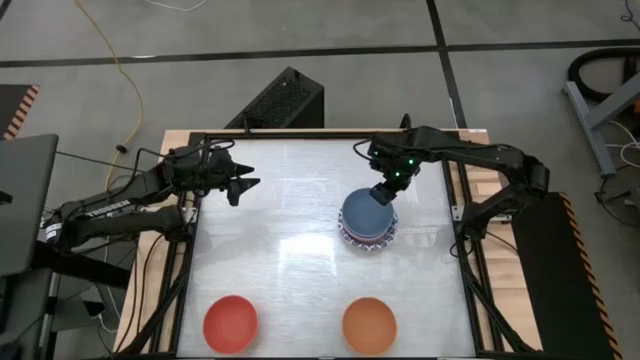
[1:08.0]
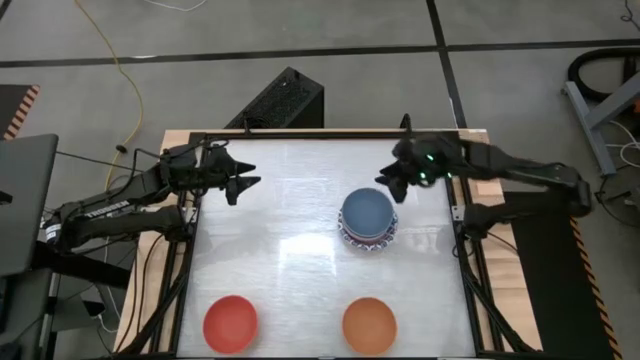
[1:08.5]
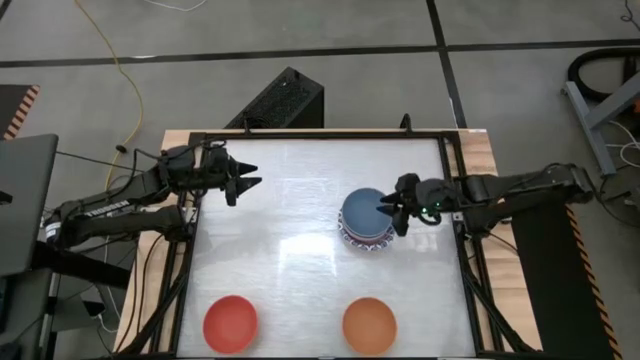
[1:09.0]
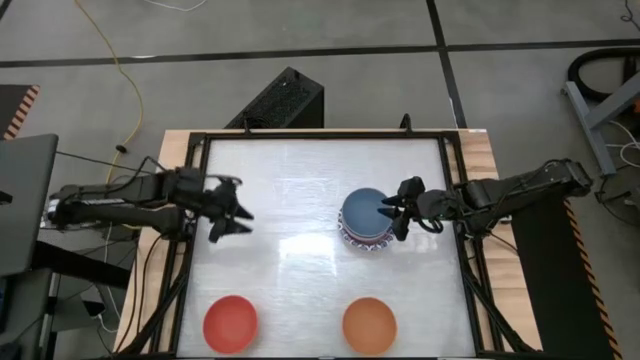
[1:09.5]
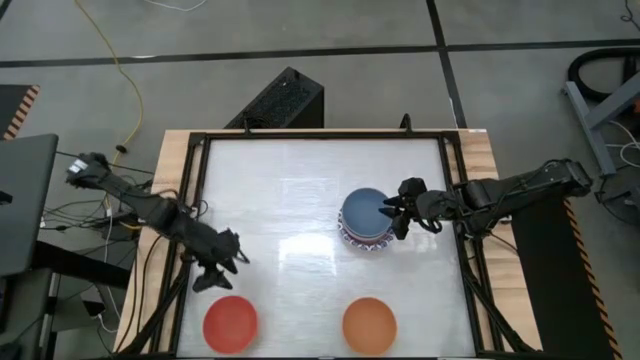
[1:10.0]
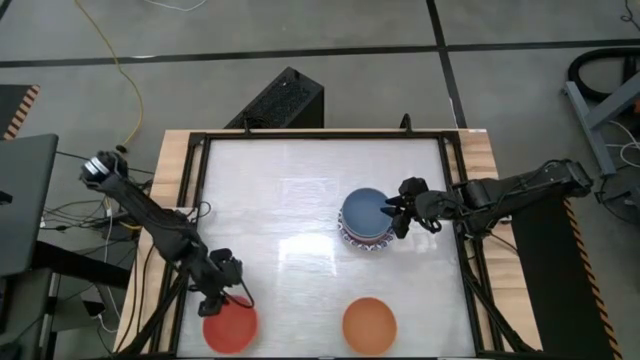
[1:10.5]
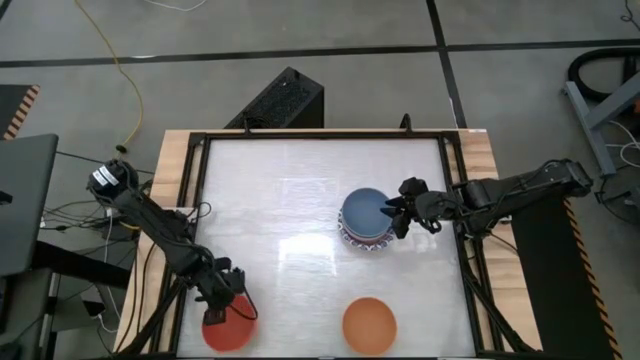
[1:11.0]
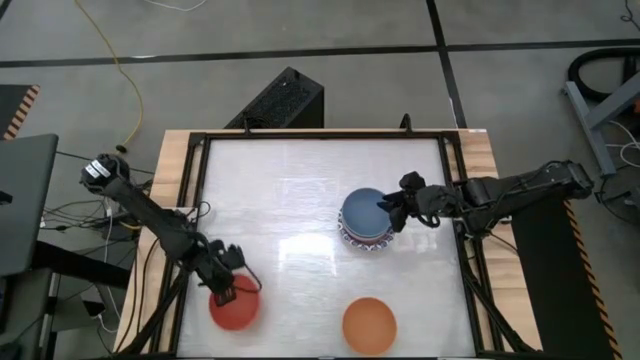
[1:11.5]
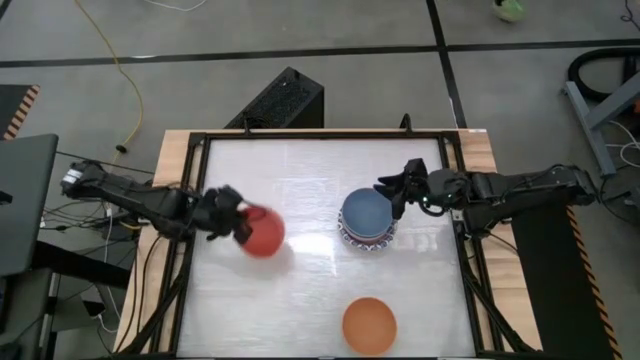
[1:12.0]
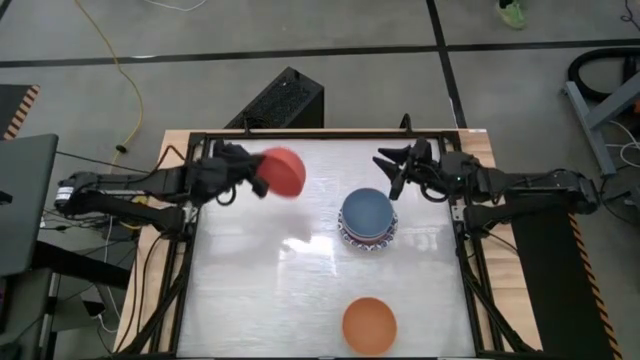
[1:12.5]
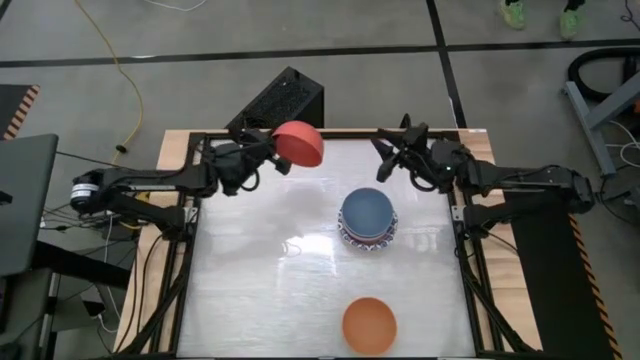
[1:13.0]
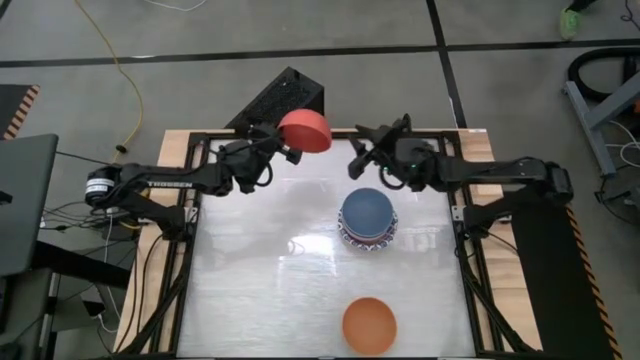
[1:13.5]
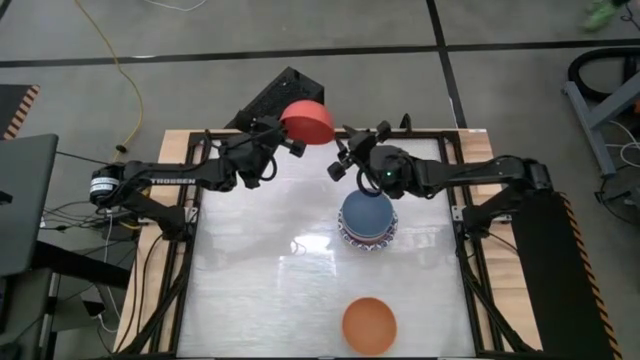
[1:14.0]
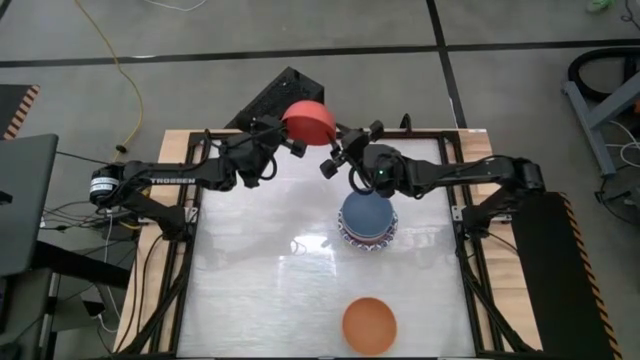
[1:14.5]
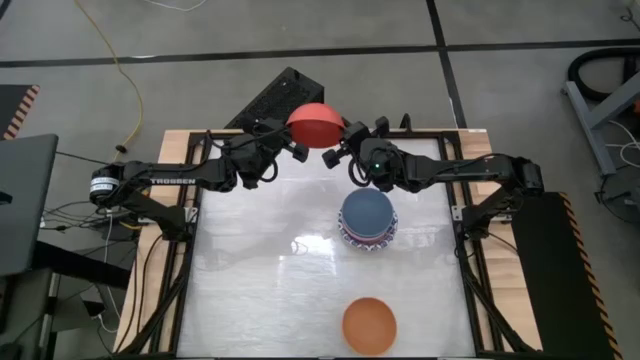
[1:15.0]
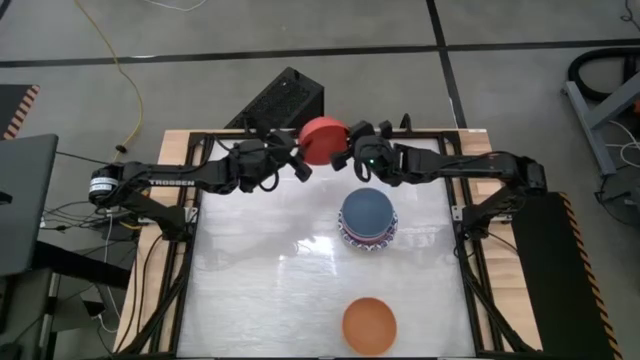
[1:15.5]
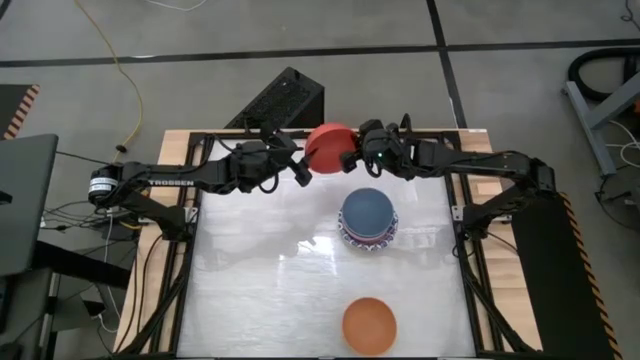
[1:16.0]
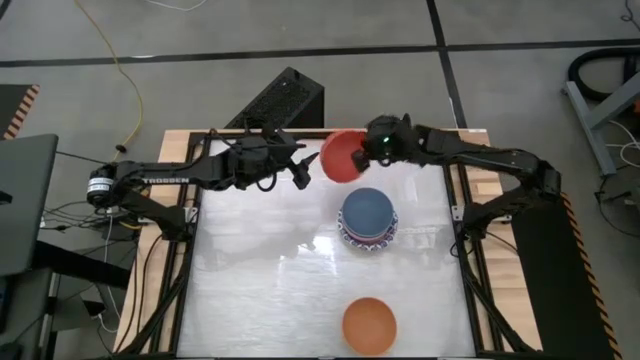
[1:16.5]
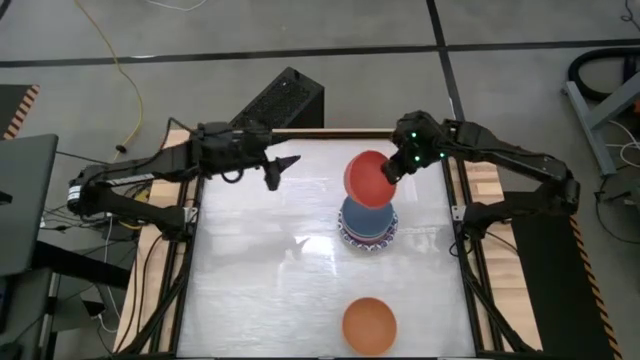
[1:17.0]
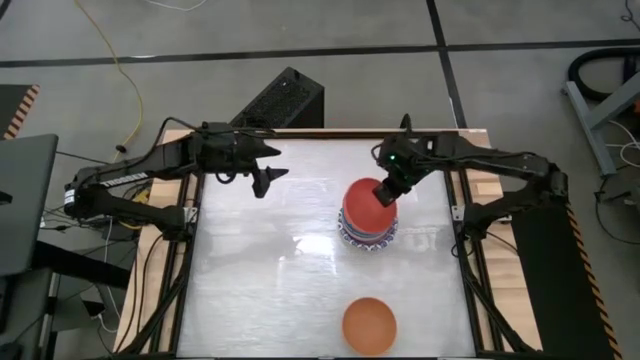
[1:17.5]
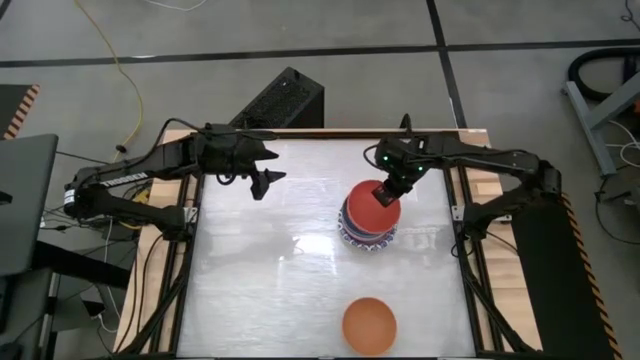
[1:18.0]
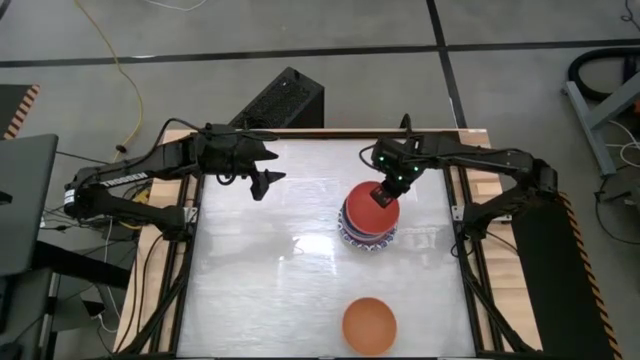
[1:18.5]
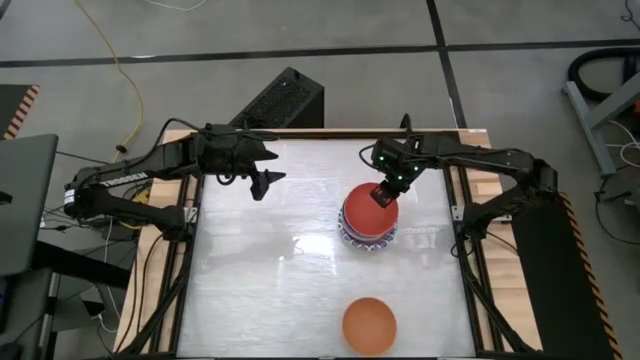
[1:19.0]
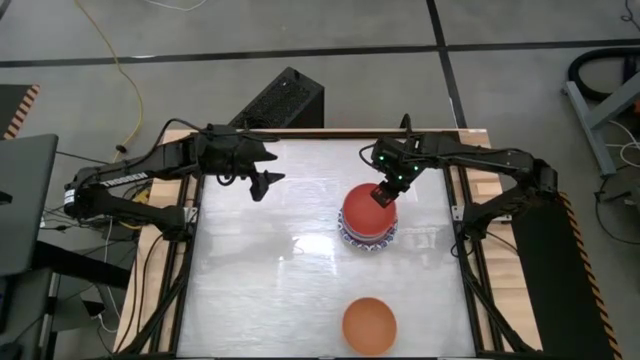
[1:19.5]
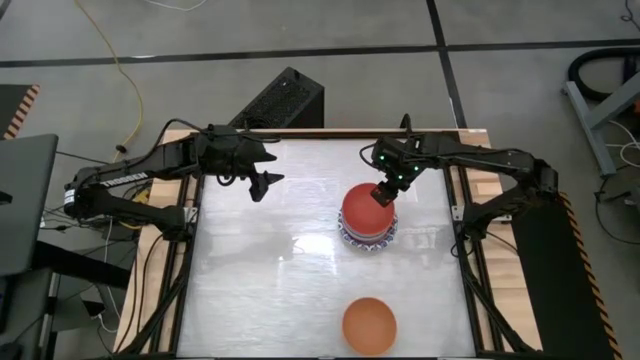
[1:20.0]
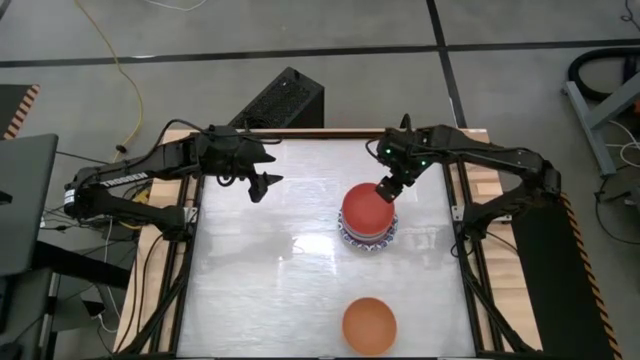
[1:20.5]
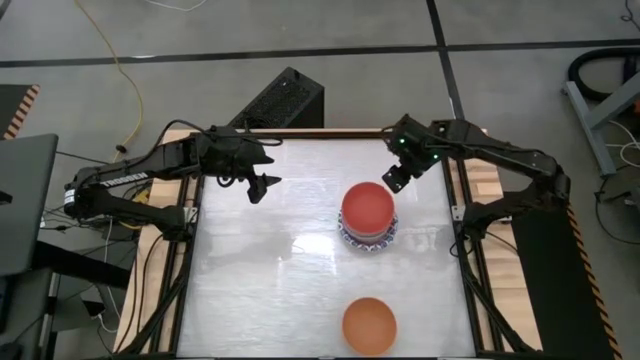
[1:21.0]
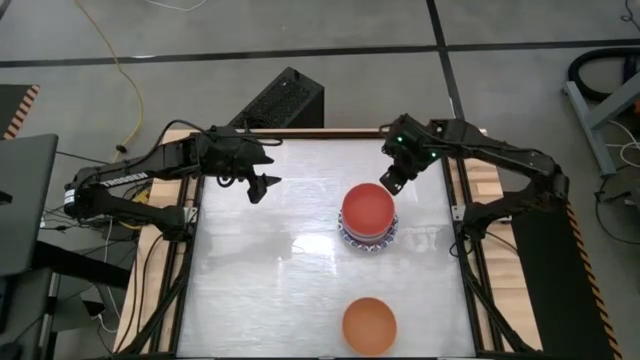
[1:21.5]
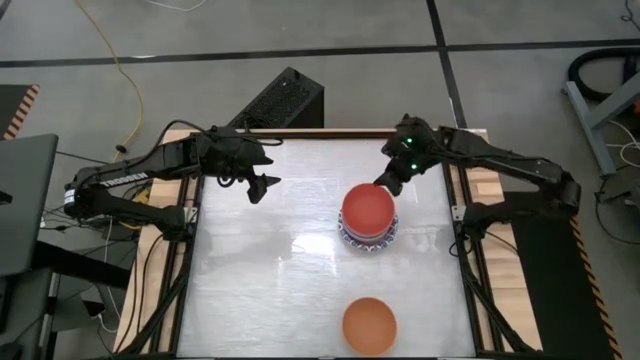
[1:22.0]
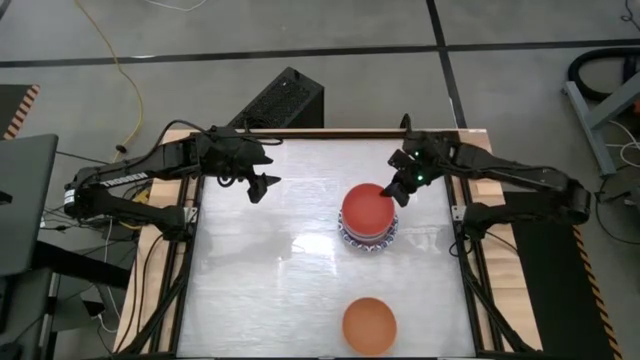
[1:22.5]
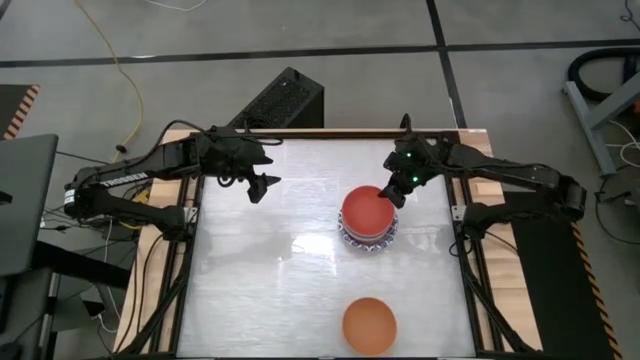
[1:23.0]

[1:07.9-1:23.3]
Stack the orange bowl on top of the blue bowl

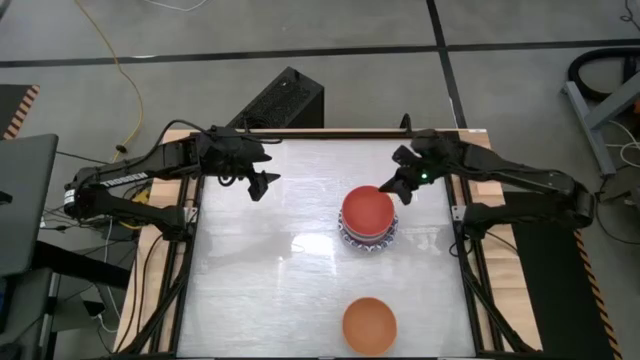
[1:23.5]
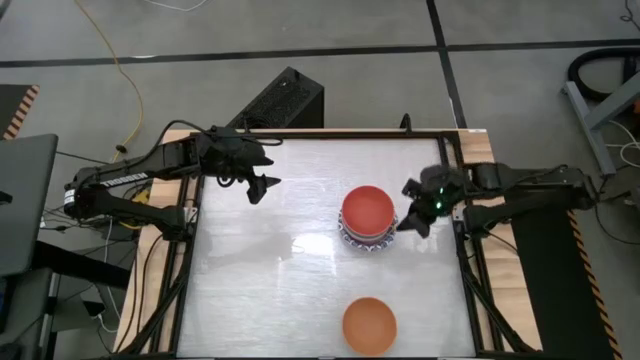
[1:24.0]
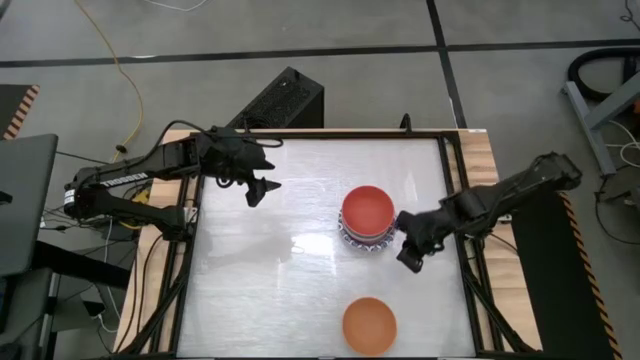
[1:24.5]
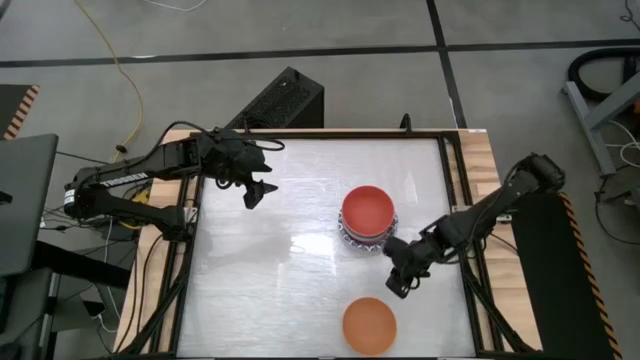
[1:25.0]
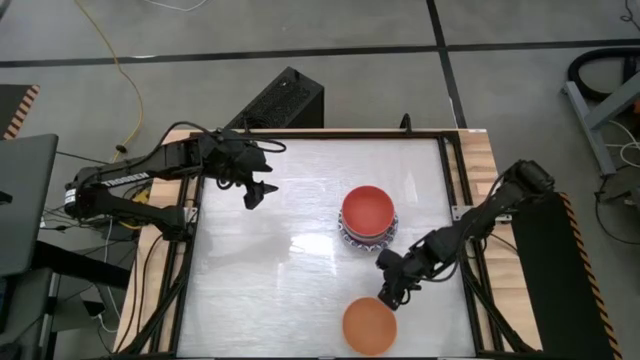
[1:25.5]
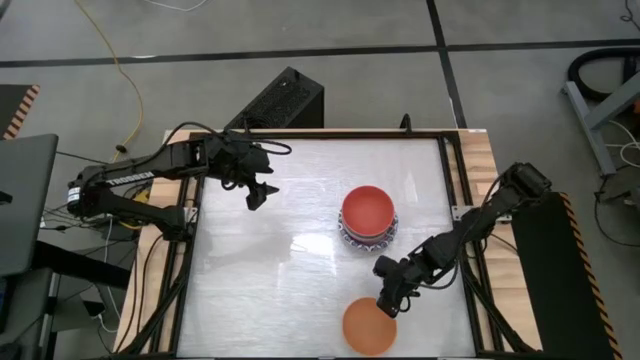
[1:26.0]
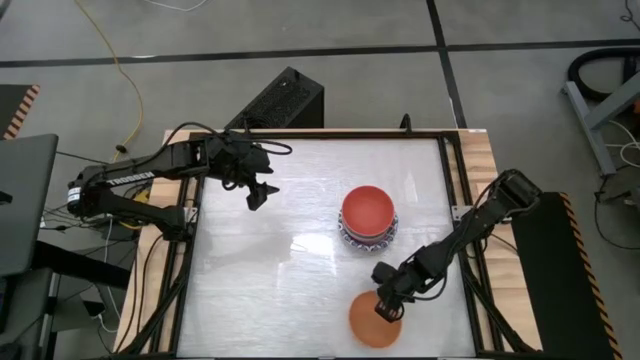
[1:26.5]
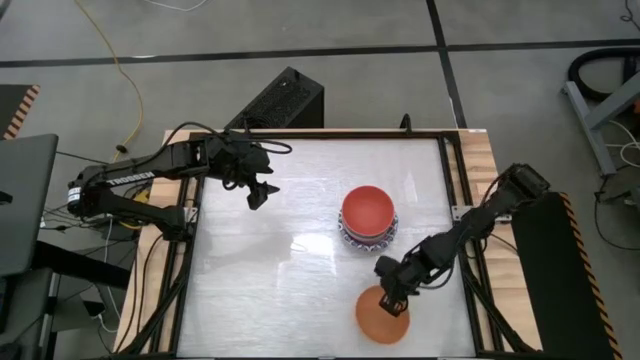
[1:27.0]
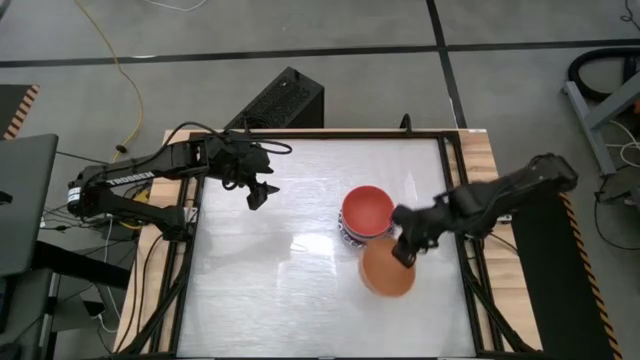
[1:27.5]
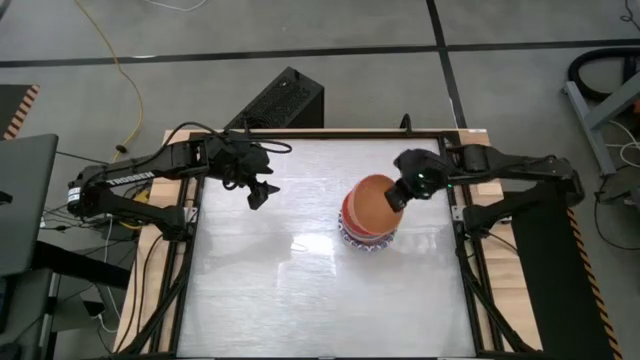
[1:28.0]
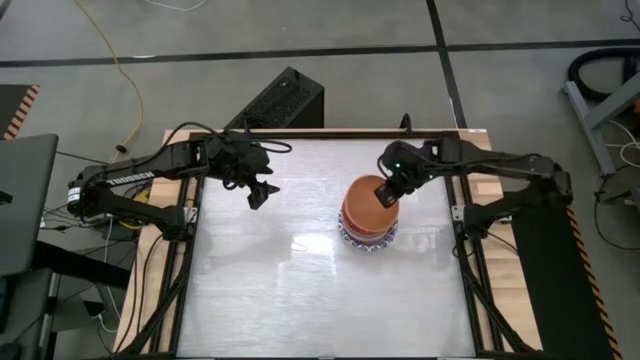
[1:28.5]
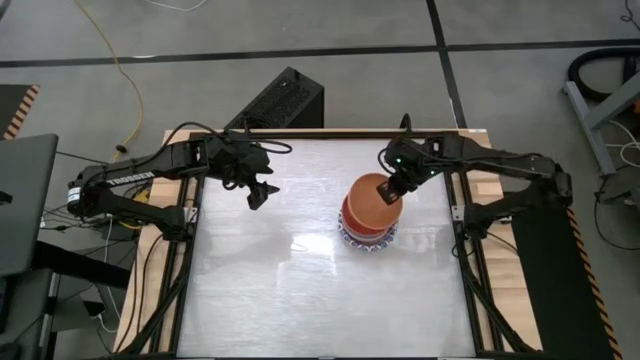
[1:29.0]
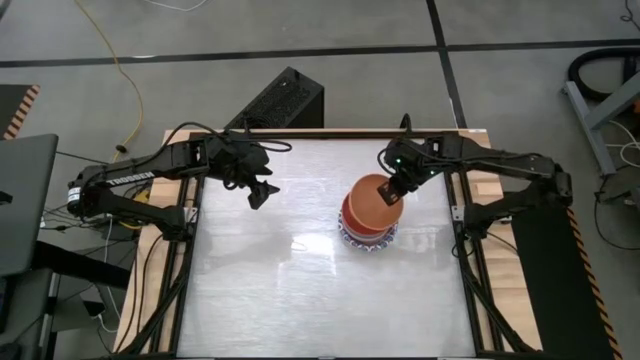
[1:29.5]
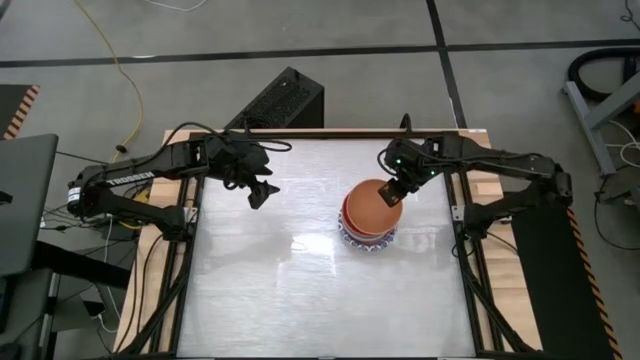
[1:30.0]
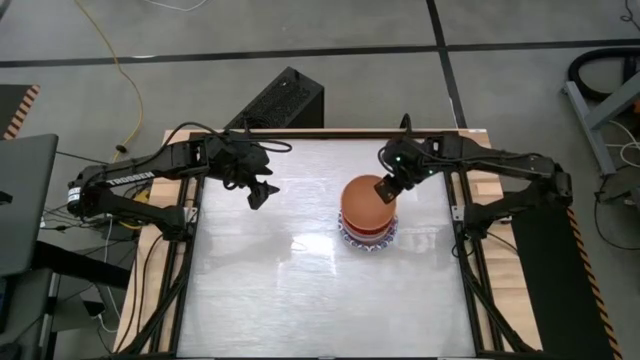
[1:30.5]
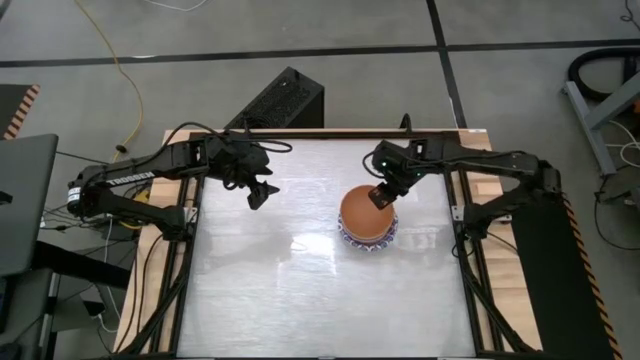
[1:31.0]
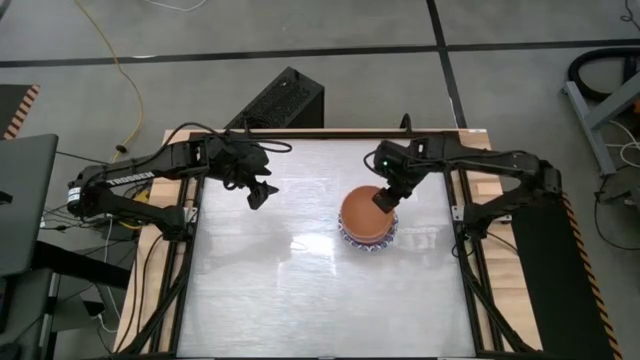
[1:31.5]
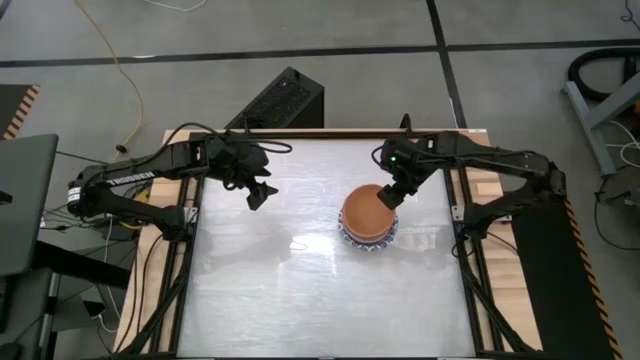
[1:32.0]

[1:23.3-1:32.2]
Stack the light orange bowl on top of the orange bowl
